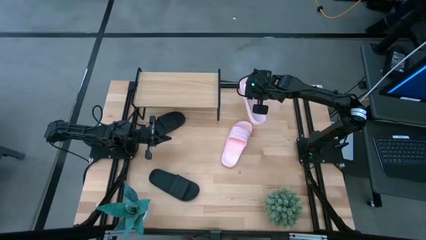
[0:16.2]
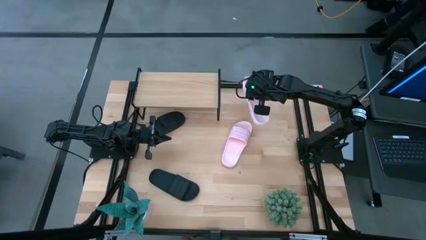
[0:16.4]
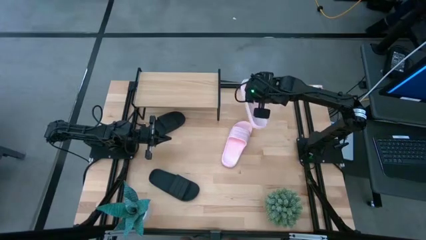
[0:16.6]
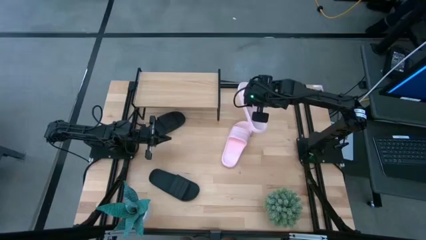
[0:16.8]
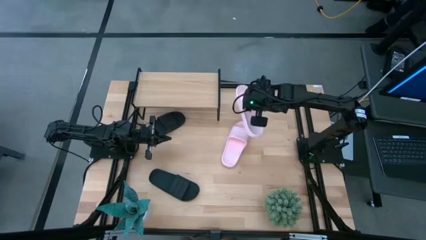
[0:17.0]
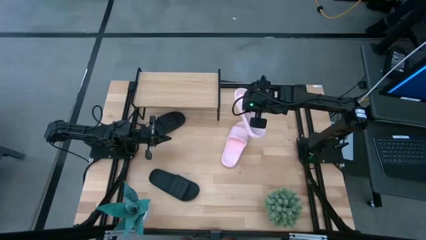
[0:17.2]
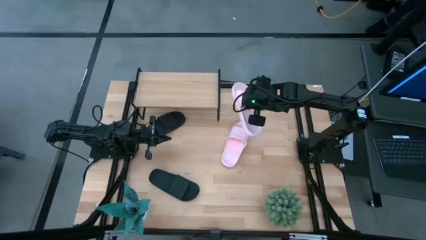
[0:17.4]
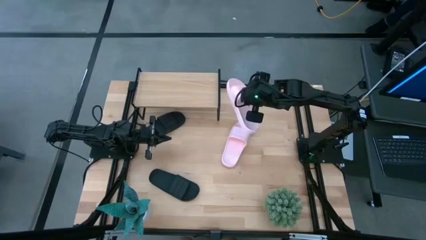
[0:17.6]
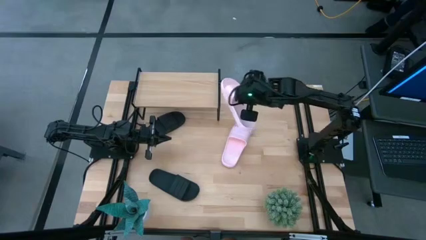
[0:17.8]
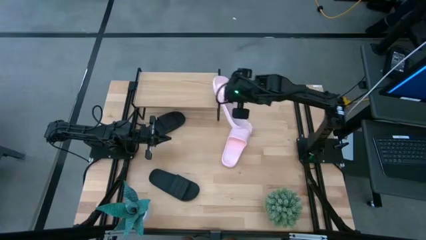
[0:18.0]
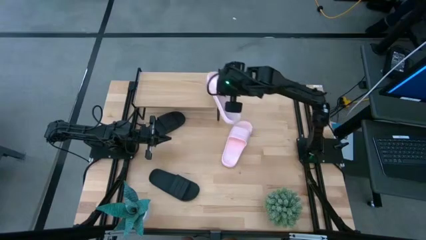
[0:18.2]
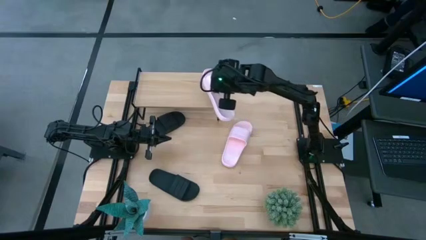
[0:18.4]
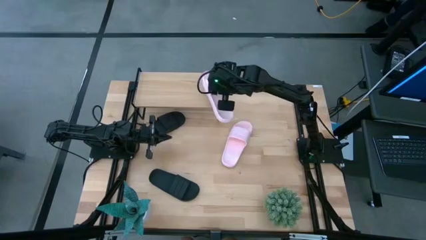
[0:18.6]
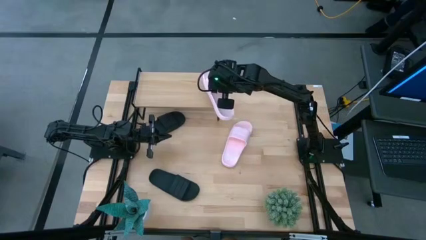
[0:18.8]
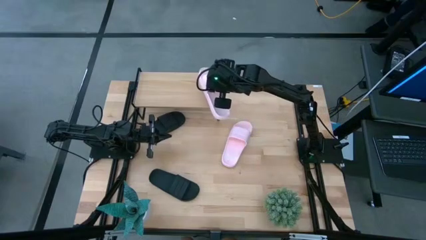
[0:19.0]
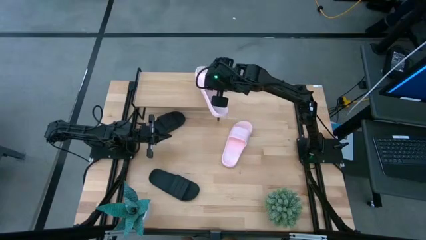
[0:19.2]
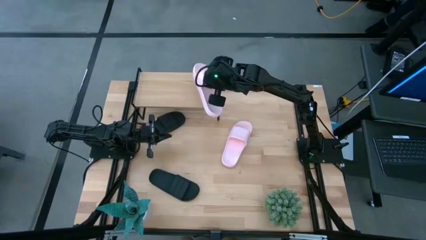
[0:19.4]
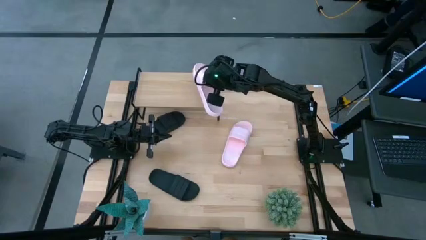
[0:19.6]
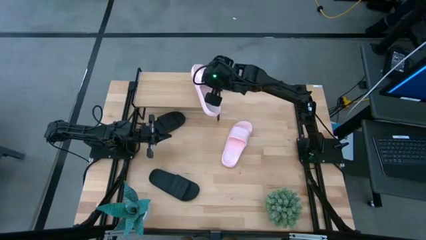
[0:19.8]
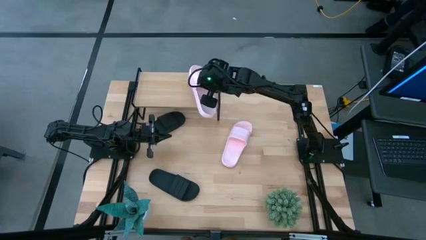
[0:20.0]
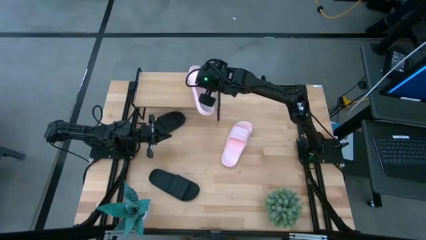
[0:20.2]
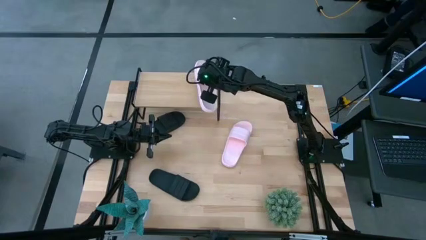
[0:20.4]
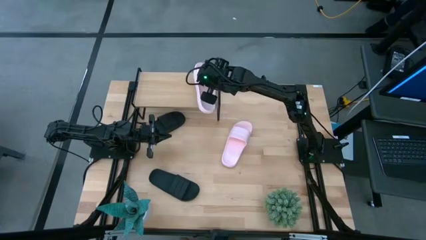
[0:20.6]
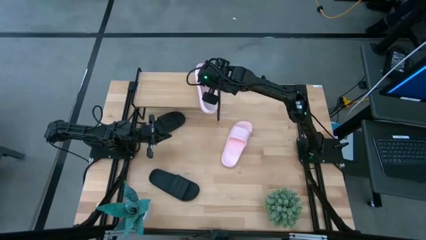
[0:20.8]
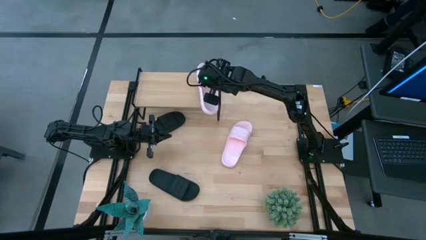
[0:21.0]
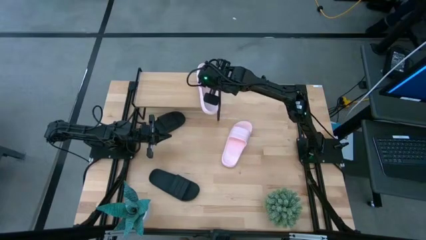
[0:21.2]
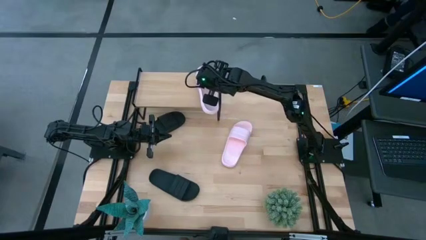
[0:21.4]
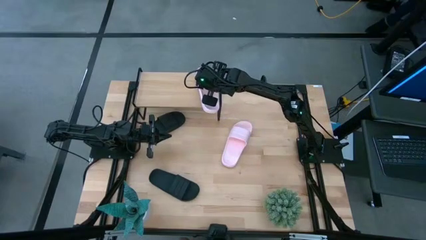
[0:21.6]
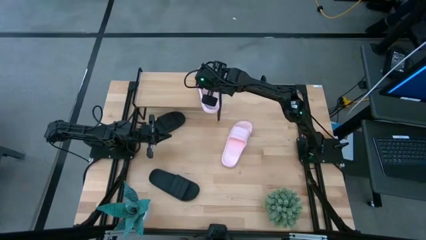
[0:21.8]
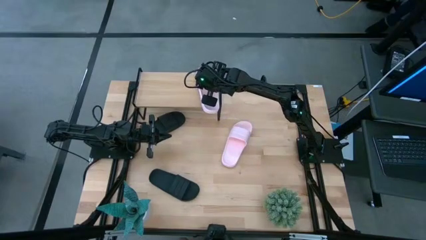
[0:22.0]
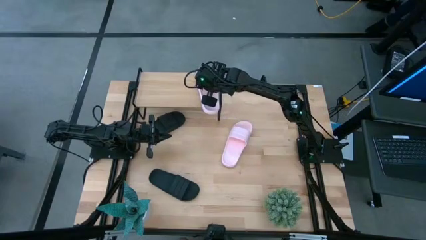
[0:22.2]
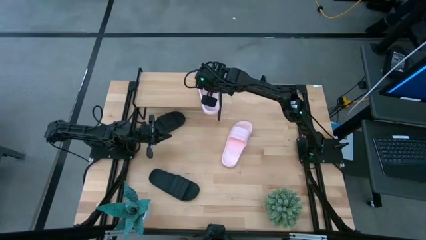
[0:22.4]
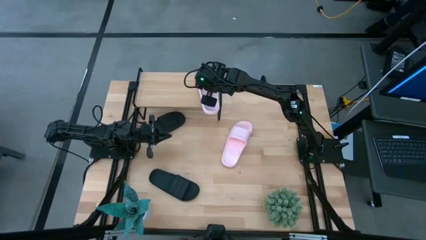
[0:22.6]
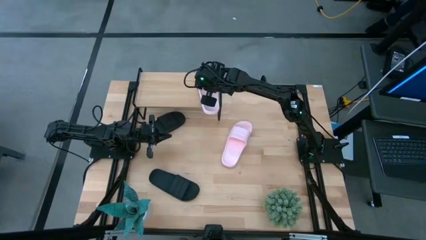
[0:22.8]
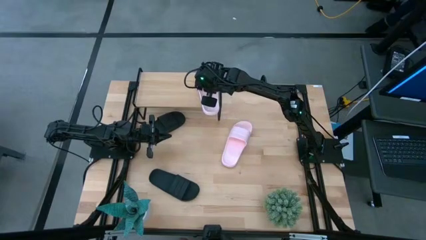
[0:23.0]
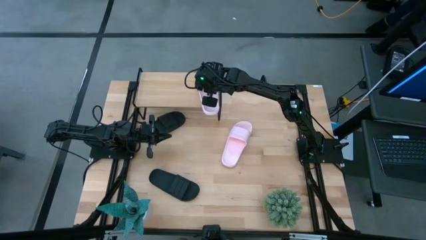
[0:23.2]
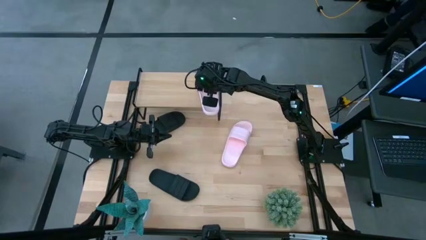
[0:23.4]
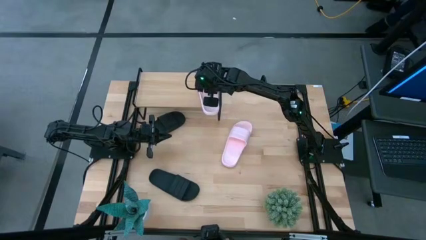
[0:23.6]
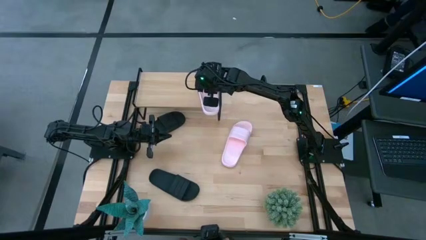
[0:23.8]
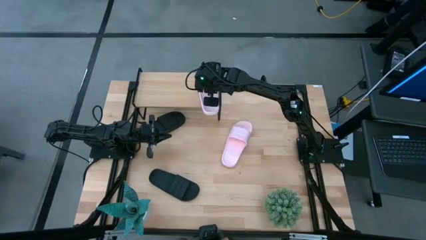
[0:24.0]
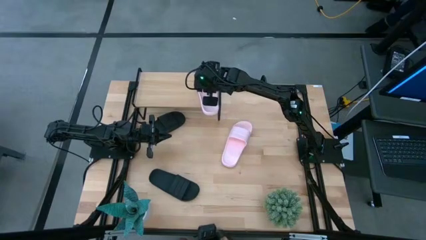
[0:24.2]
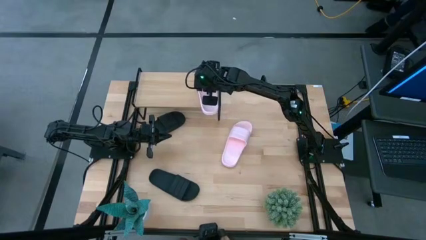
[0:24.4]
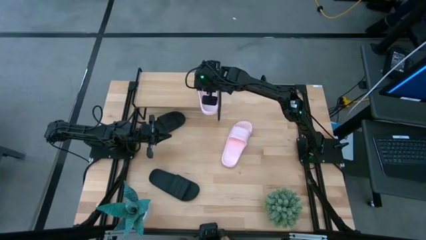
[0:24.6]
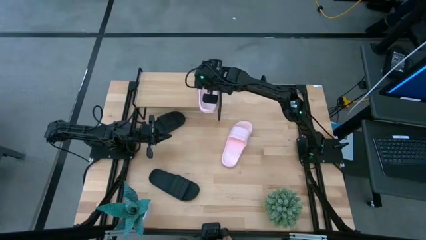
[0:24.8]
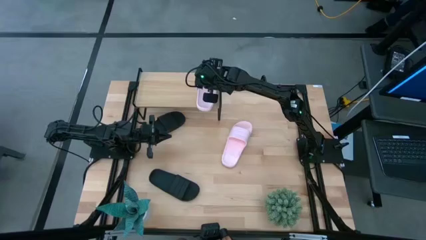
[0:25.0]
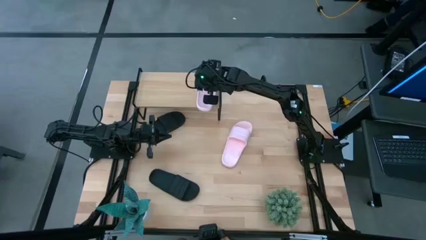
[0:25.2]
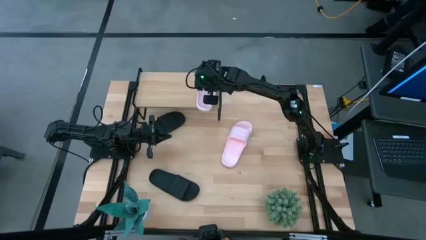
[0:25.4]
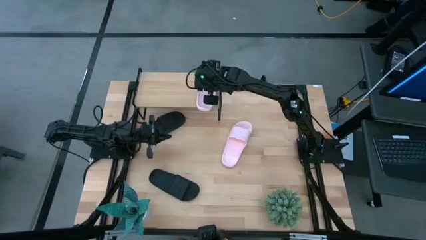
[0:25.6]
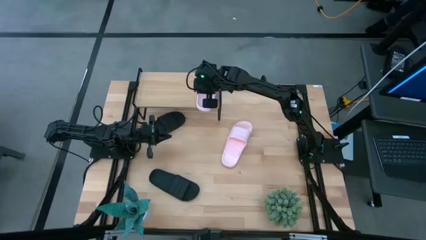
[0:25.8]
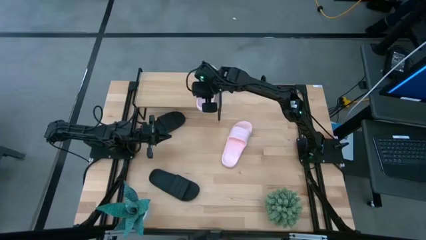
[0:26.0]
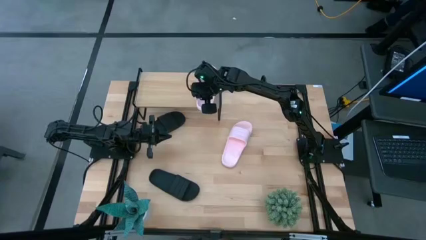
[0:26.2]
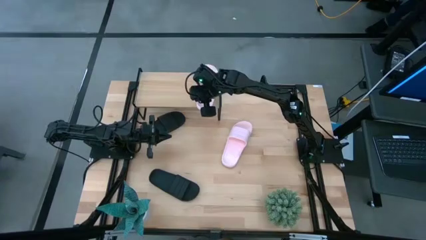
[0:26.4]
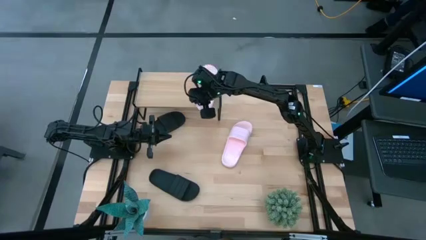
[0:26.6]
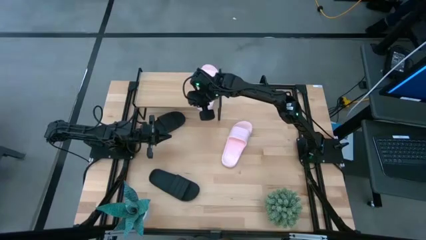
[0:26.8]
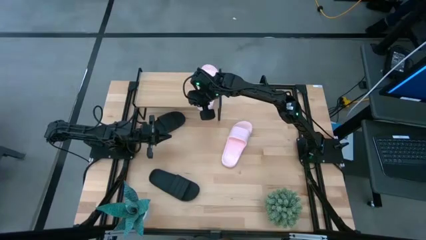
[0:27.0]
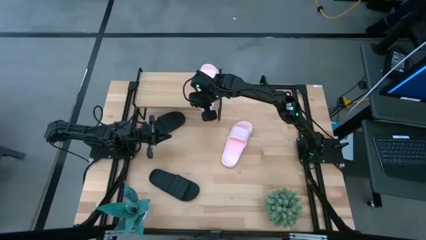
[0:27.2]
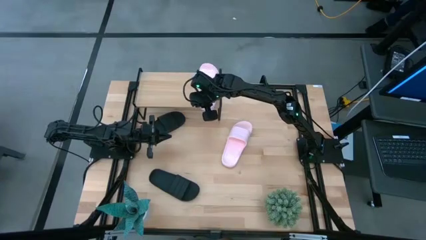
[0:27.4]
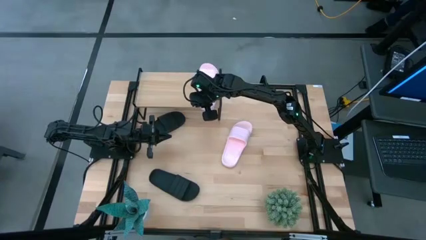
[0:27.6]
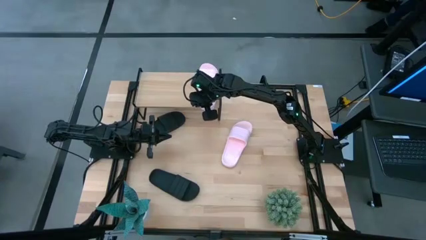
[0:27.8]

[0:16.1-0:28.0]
Task: Pick and place slides into the shelf
Put the top pink slide on the shelf
